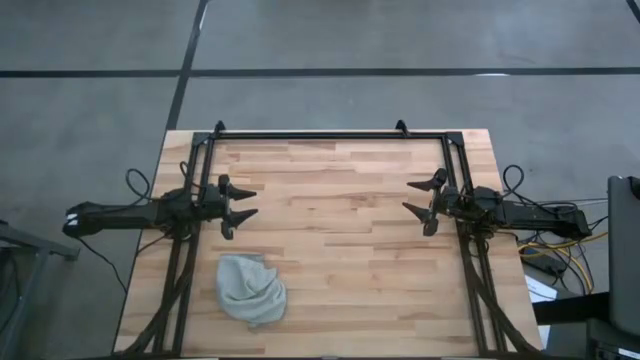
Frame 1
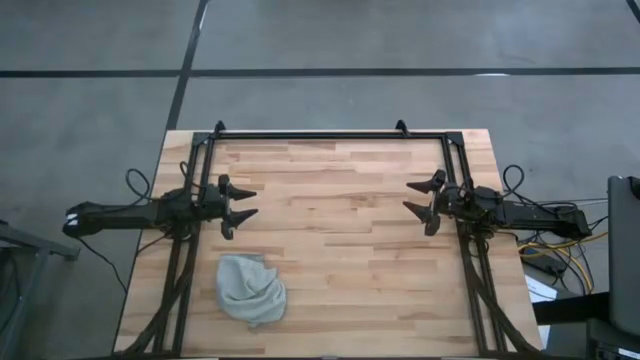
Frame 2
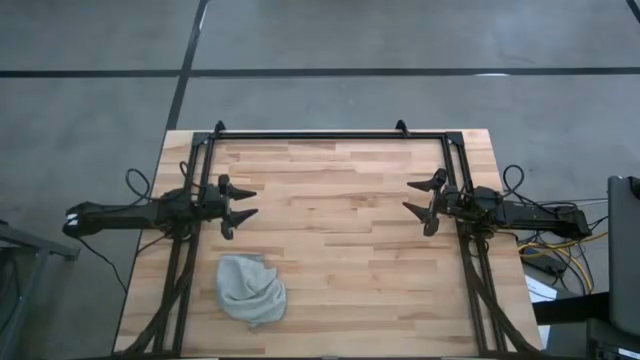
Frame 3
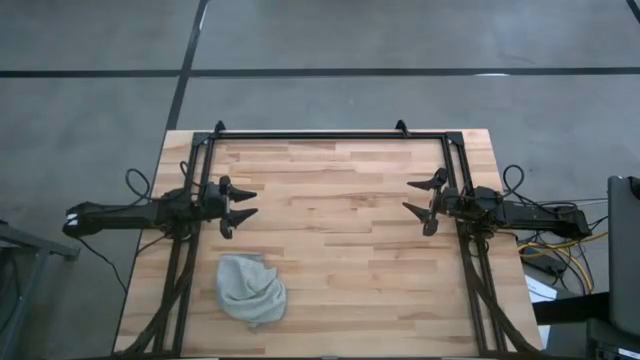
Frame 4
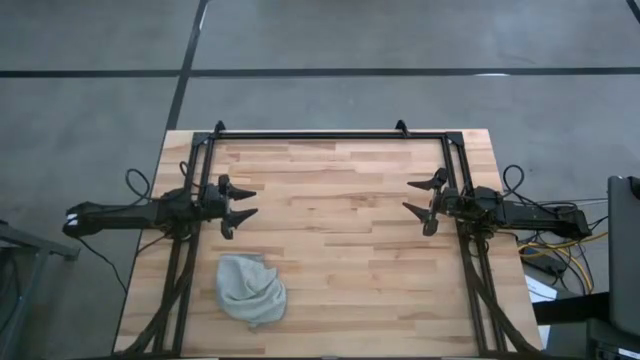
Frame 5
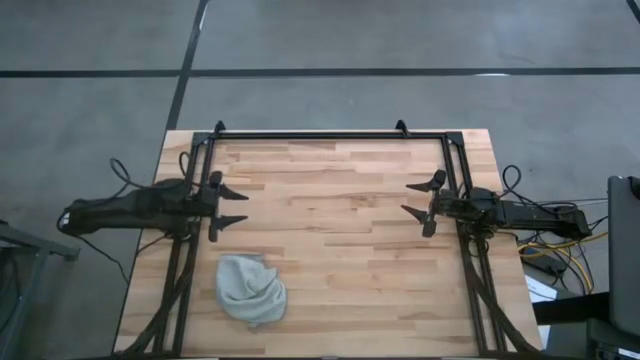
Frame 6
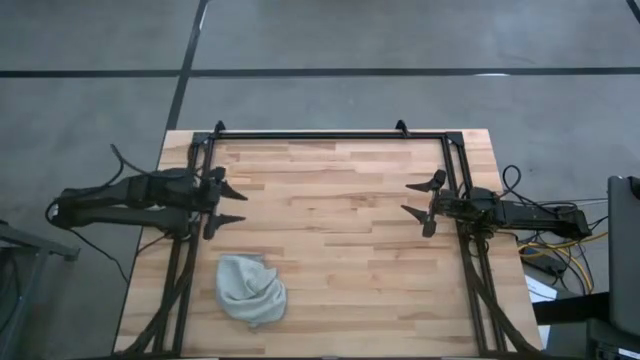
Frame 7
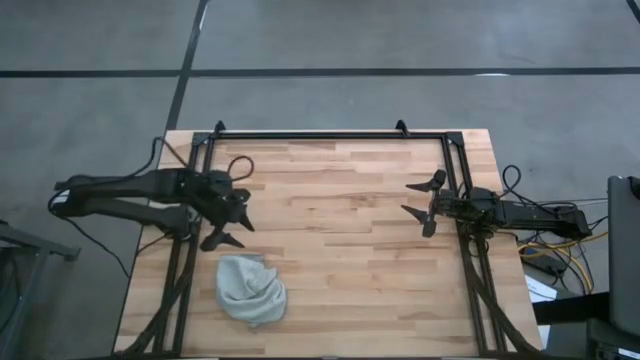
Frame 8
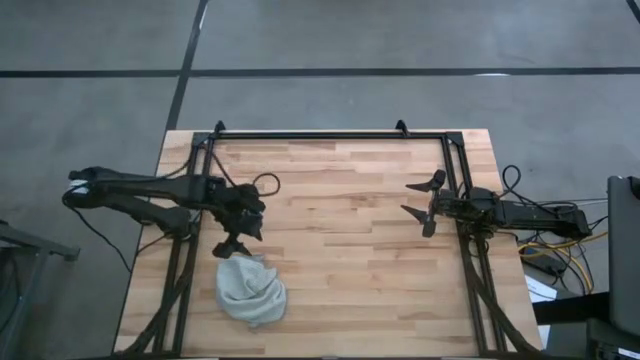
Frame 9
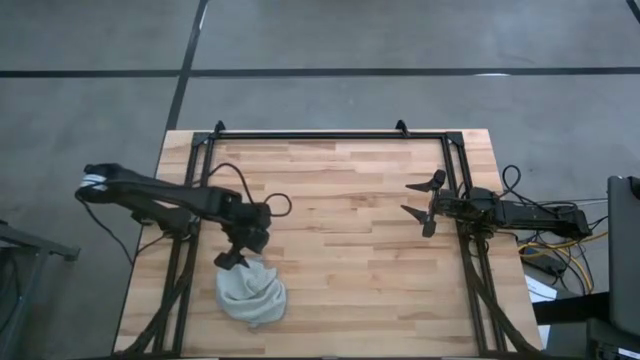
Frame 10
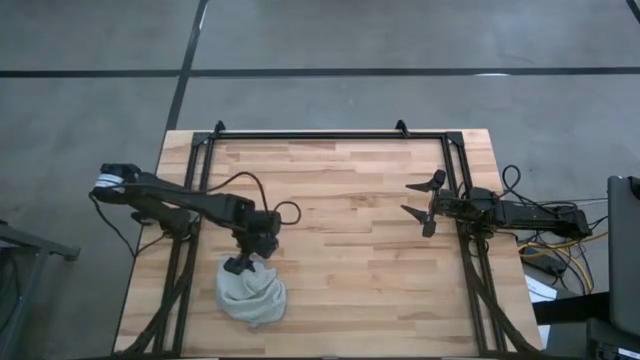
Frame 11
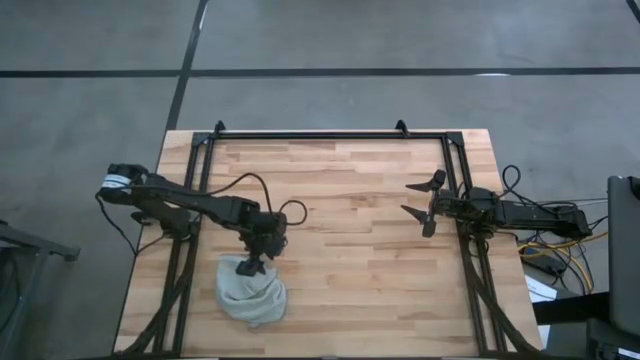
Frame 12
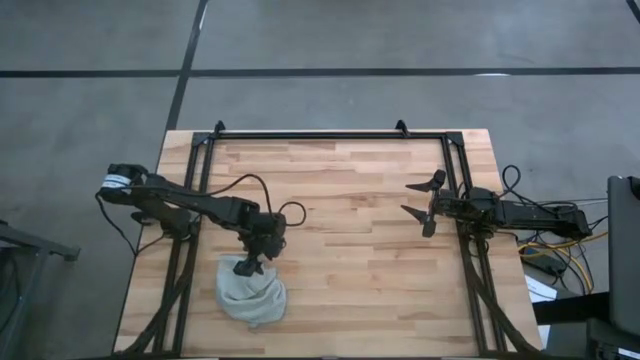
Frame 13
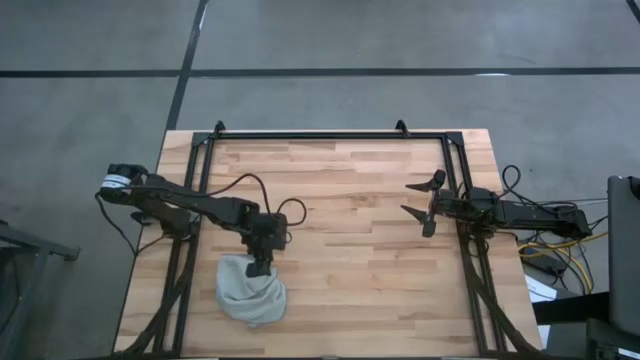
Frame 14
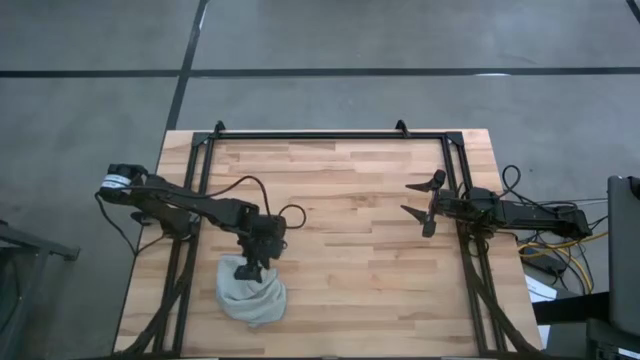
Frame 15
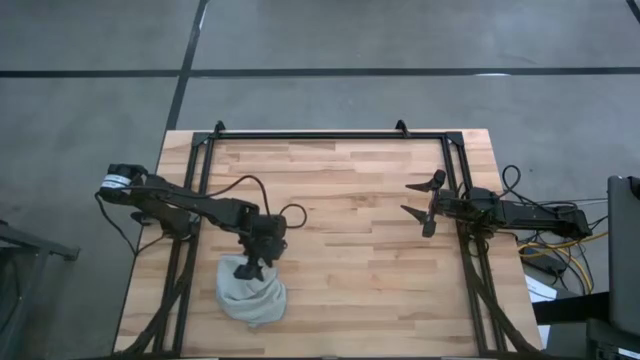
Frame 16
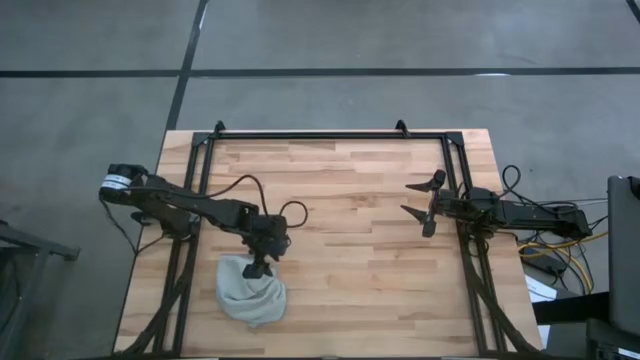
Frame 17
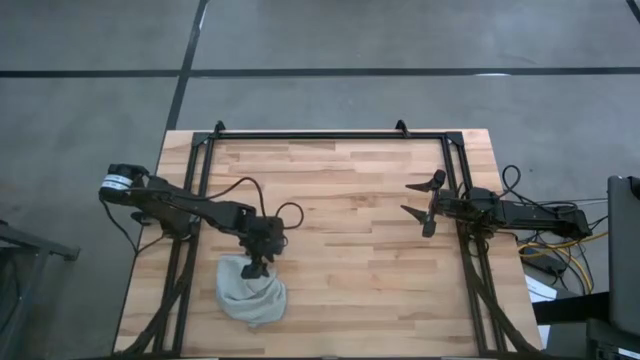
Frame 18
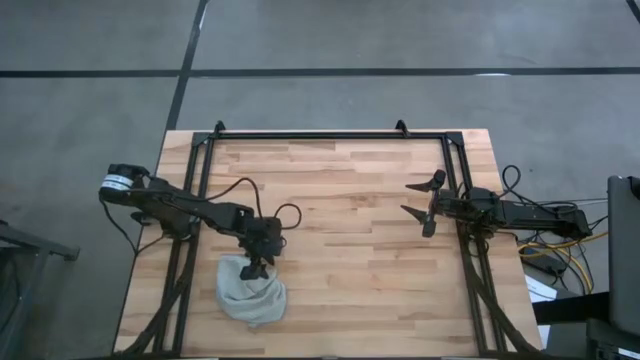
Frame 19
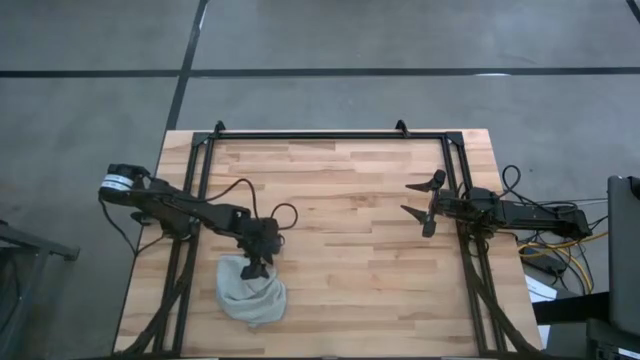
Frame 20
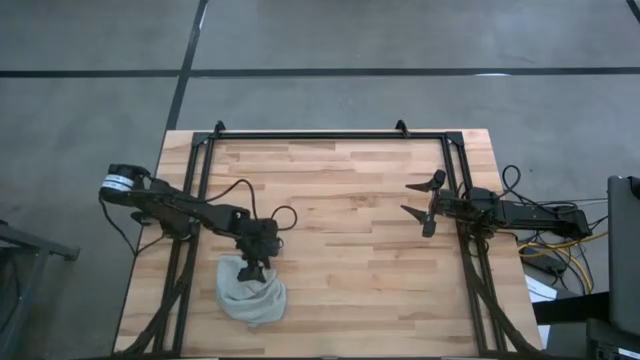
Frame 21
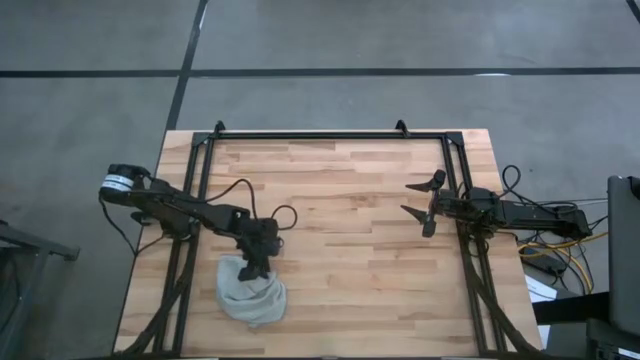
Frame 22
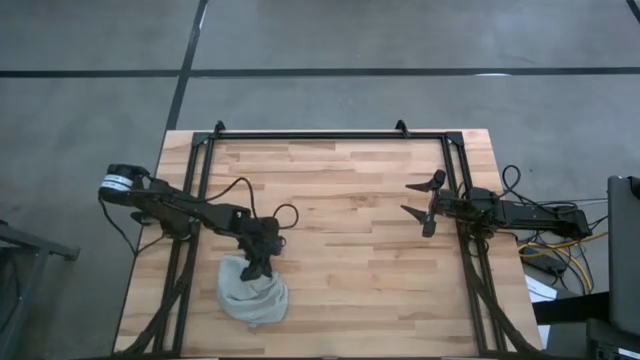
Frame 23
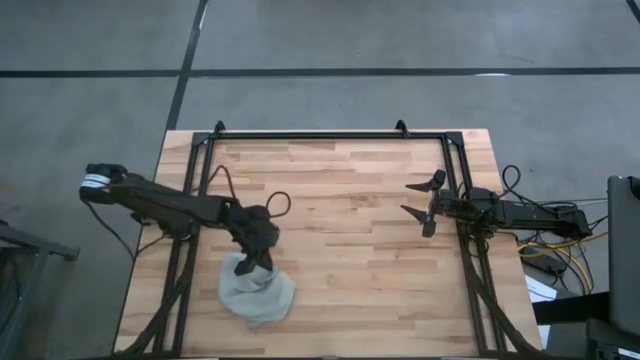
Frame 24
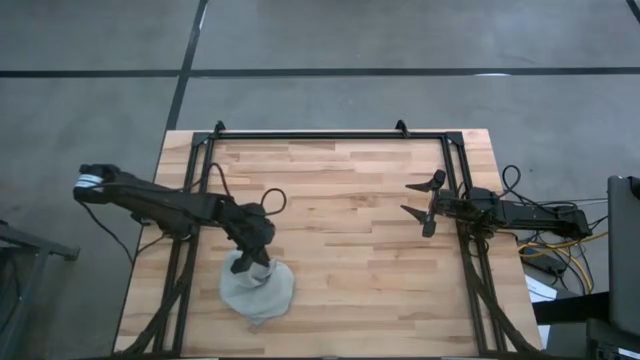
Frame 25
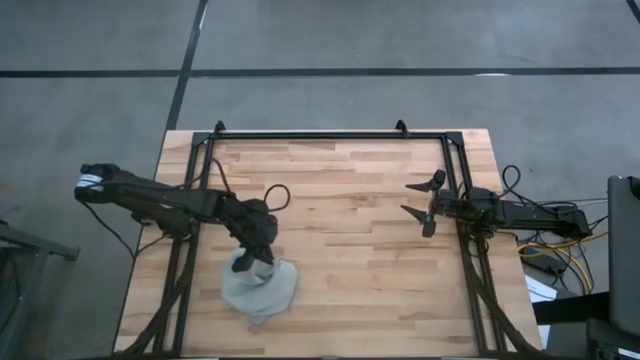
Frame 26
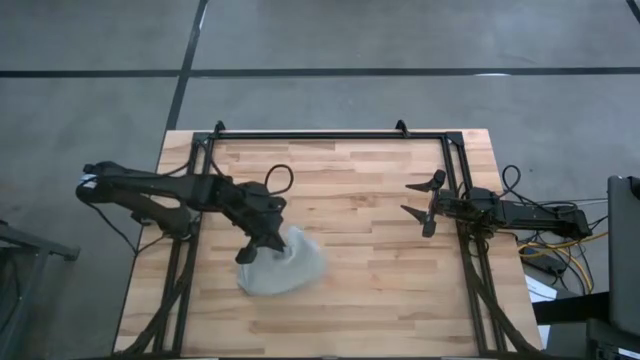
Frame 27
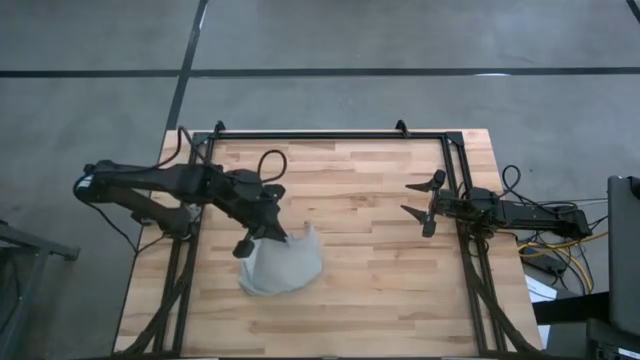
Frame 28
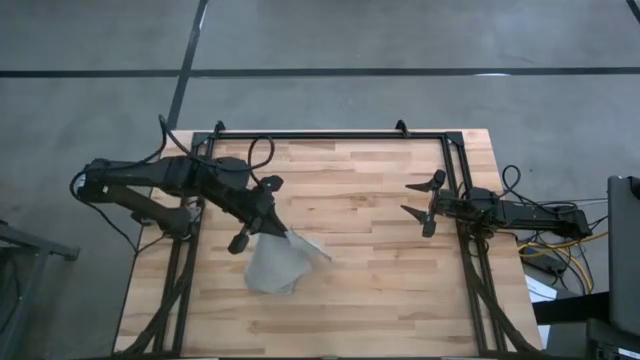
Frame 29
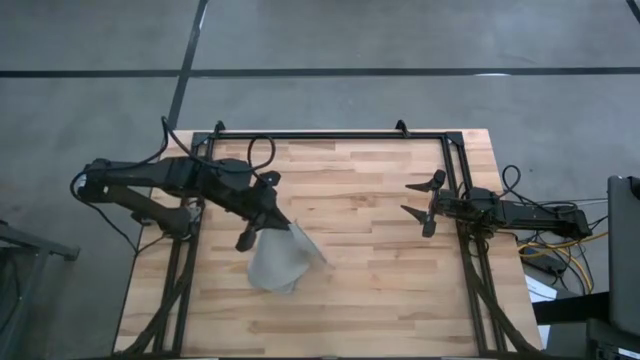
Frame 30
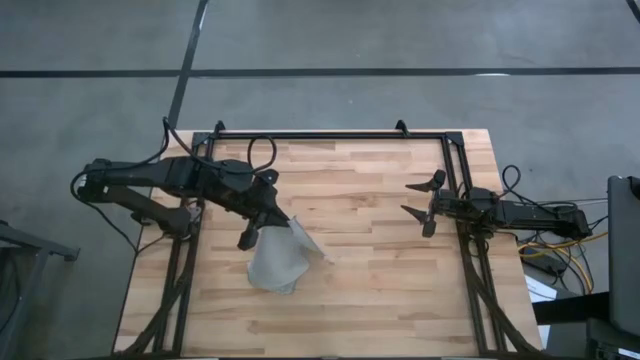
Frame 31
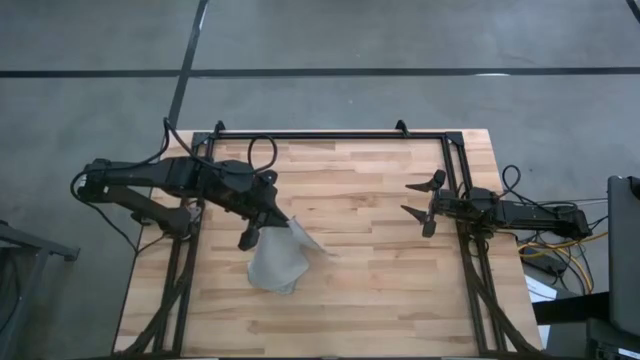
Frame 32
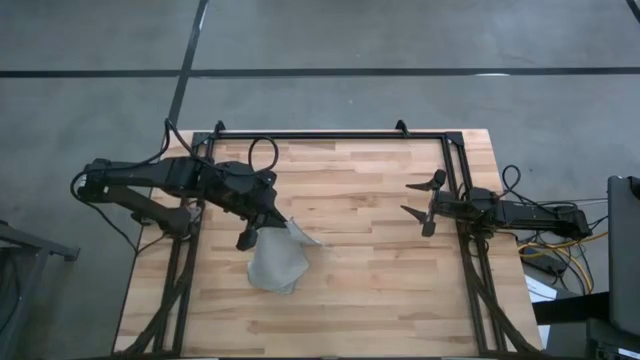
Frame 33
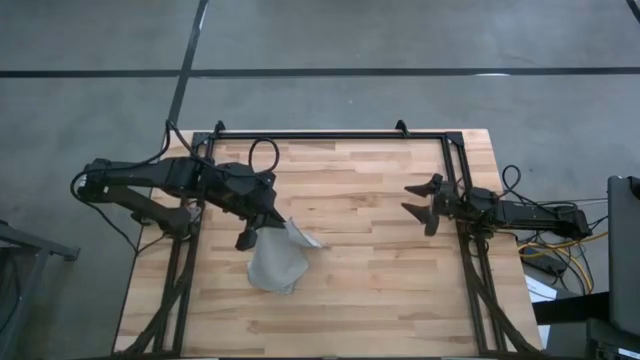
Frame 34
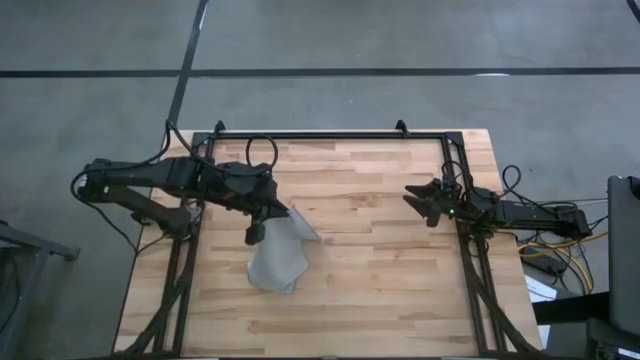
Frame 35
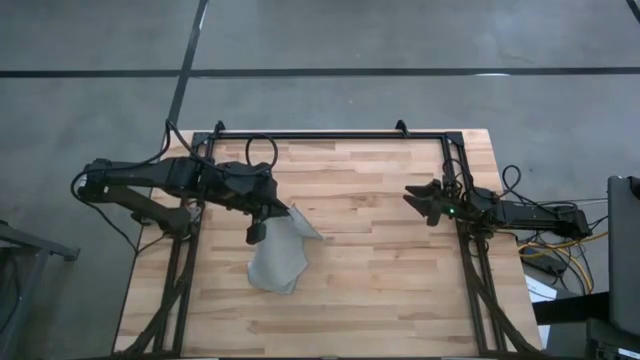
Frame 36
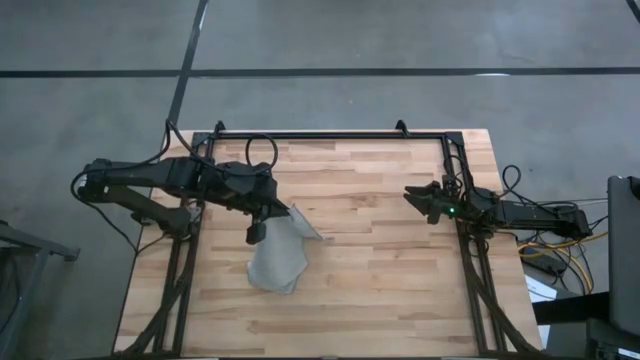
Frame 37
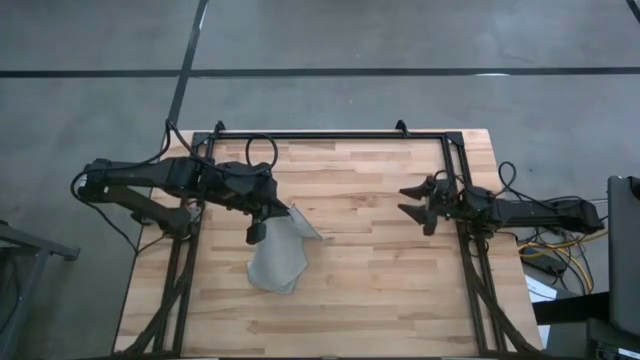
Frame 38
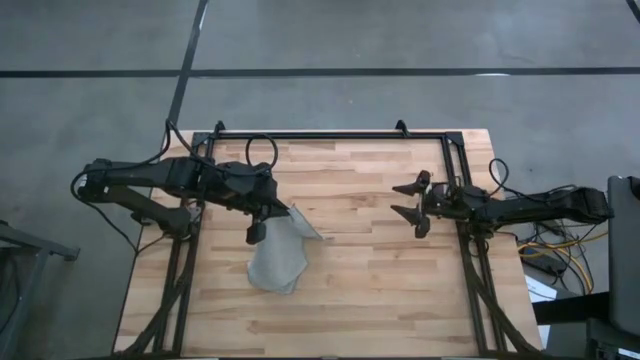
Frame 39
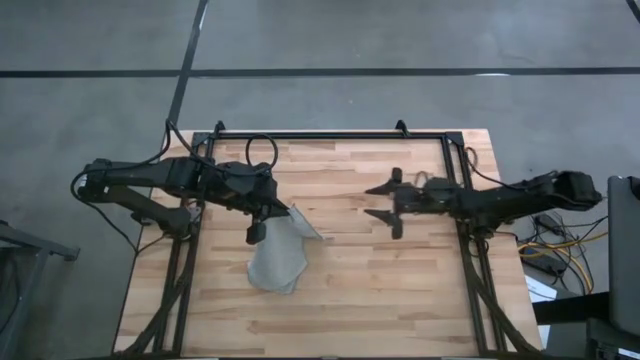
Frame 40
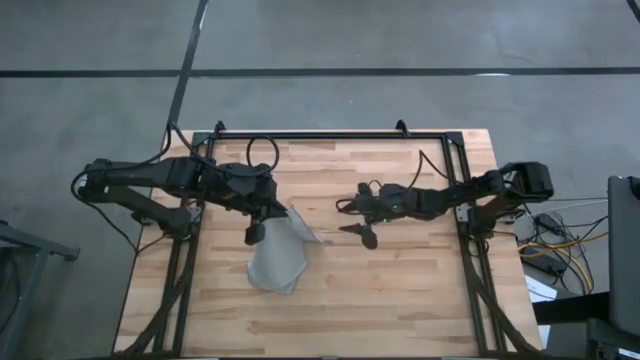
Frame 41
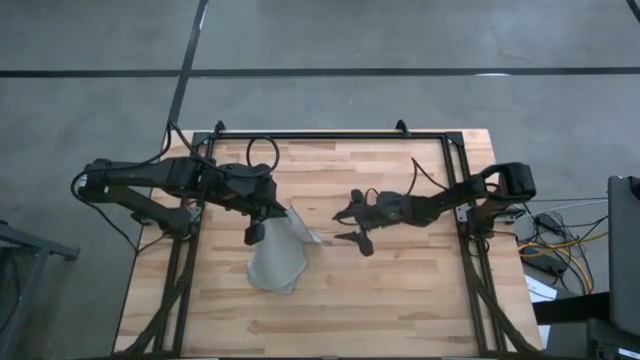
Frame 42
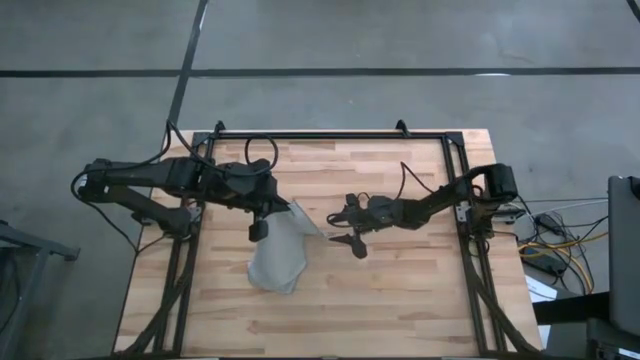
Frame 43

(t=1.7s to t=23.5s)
Task: Roll towel
Fold the gray towel on the table
